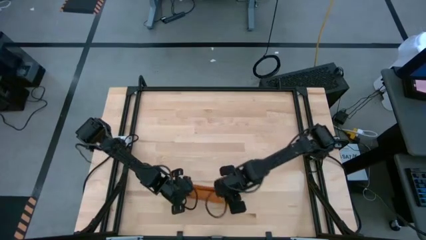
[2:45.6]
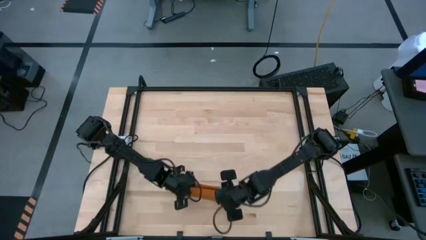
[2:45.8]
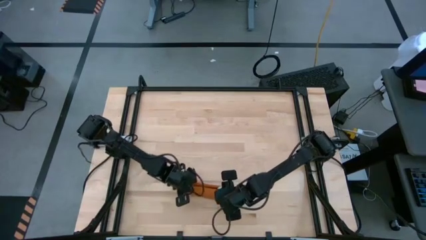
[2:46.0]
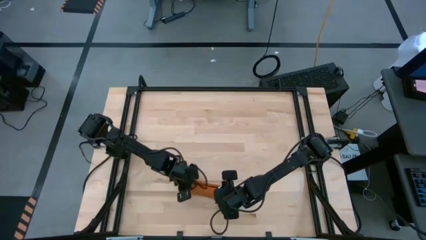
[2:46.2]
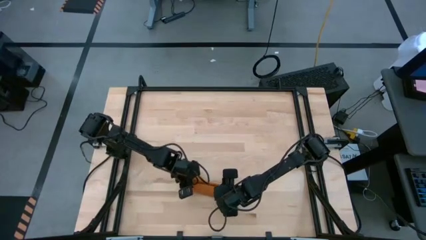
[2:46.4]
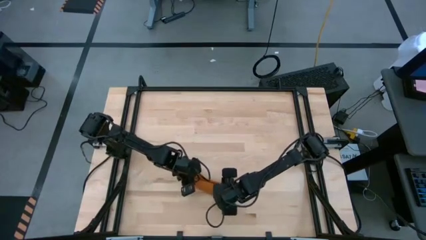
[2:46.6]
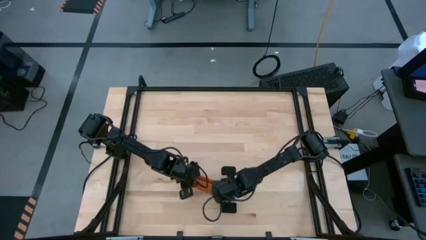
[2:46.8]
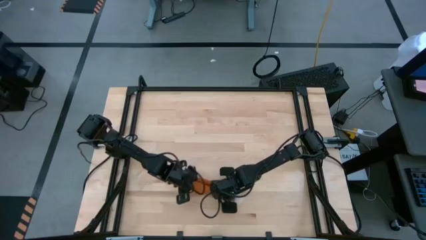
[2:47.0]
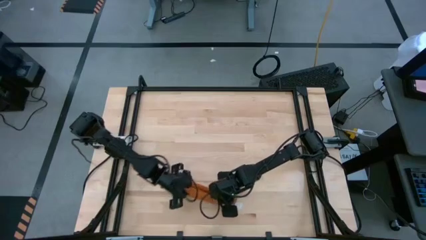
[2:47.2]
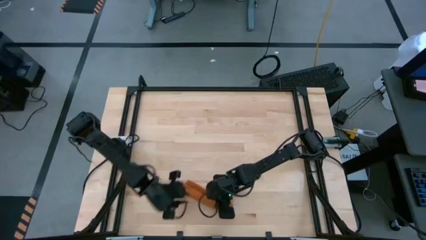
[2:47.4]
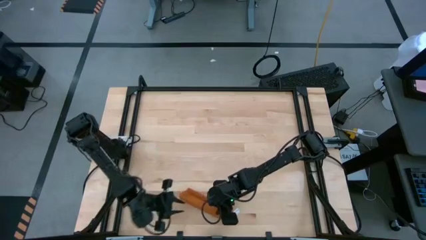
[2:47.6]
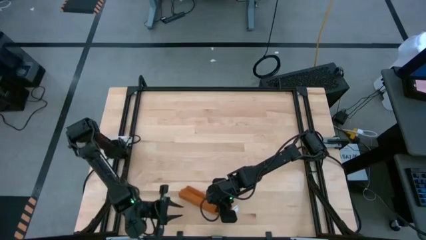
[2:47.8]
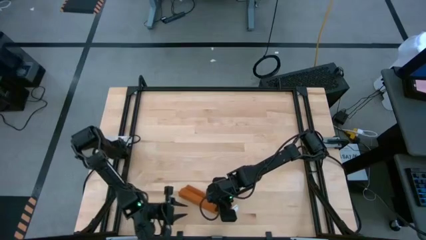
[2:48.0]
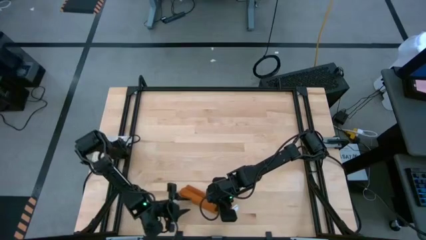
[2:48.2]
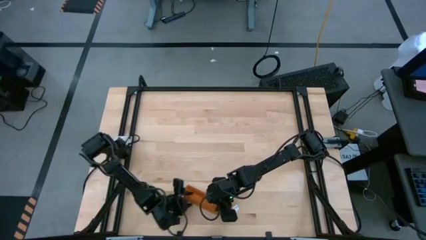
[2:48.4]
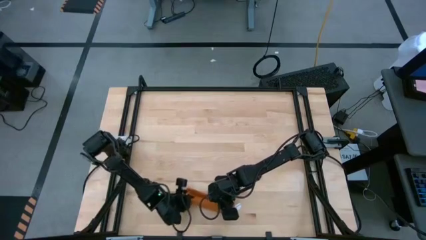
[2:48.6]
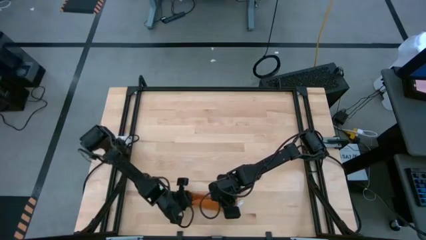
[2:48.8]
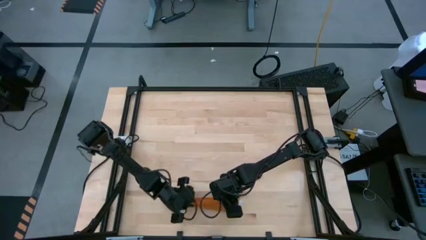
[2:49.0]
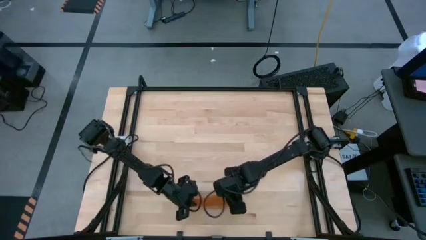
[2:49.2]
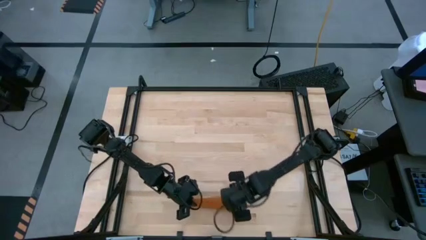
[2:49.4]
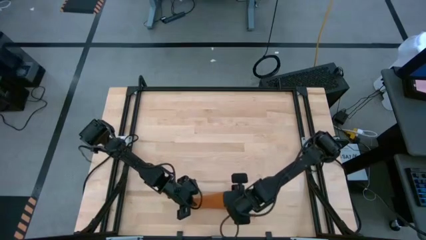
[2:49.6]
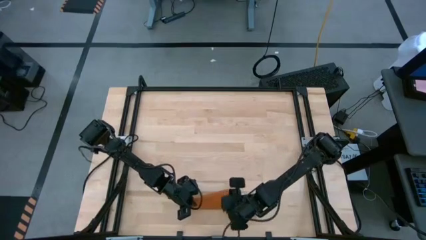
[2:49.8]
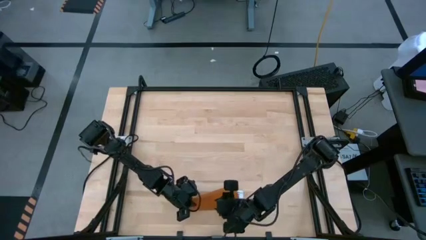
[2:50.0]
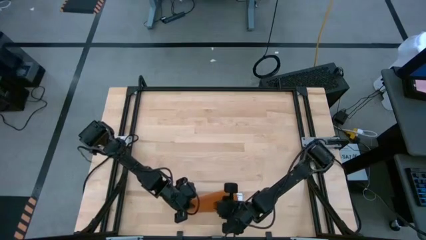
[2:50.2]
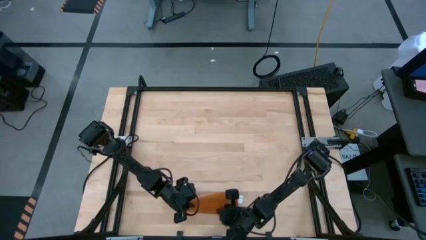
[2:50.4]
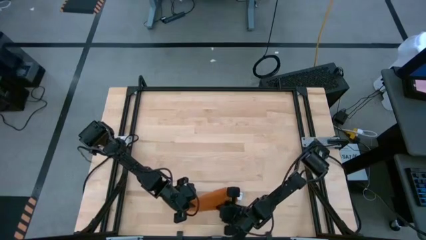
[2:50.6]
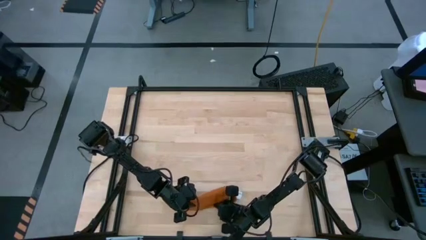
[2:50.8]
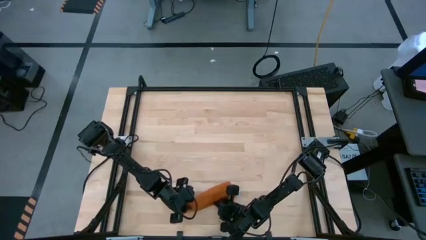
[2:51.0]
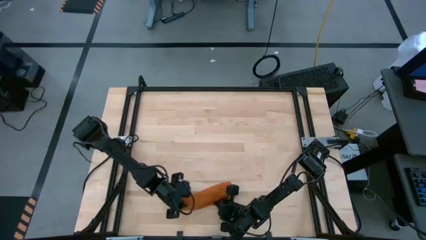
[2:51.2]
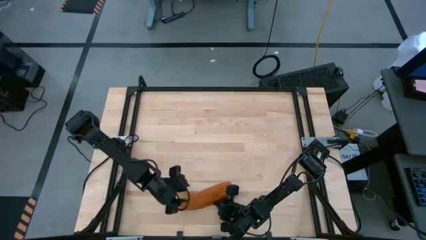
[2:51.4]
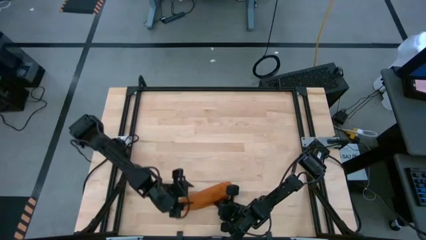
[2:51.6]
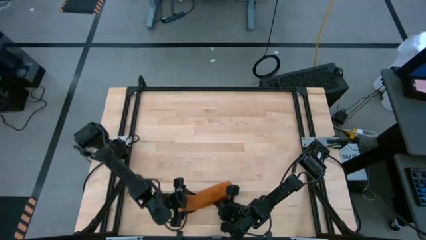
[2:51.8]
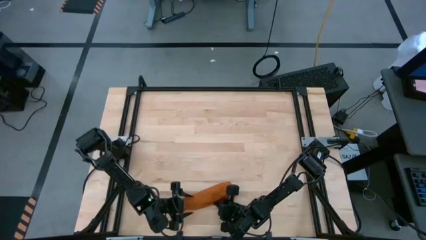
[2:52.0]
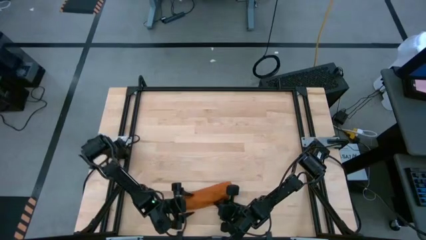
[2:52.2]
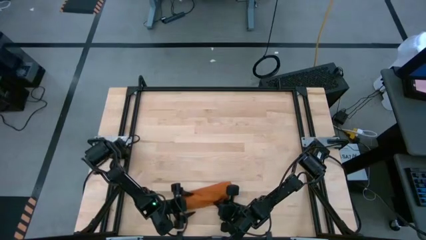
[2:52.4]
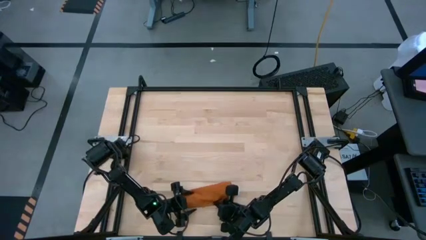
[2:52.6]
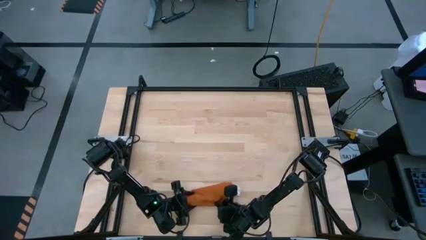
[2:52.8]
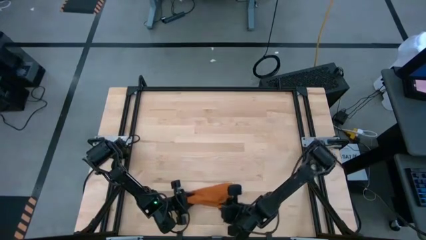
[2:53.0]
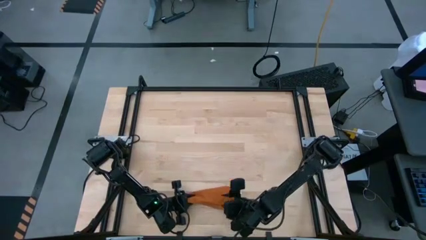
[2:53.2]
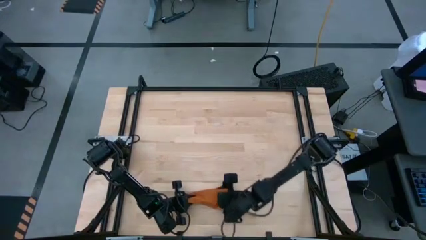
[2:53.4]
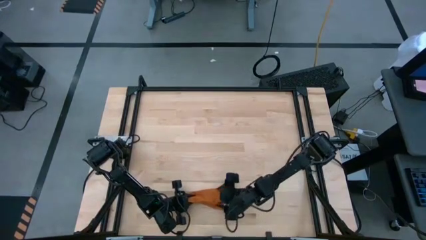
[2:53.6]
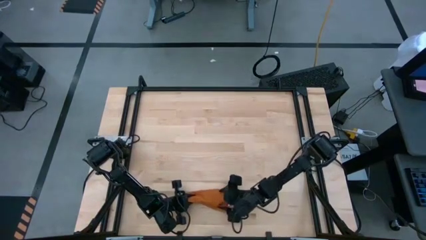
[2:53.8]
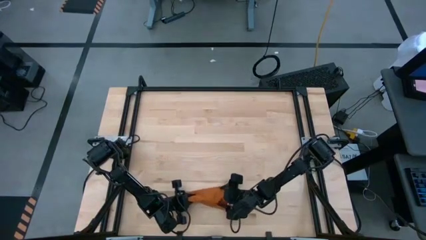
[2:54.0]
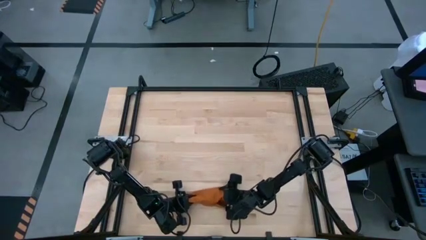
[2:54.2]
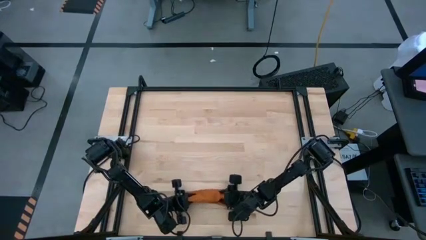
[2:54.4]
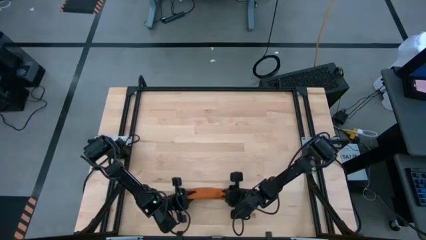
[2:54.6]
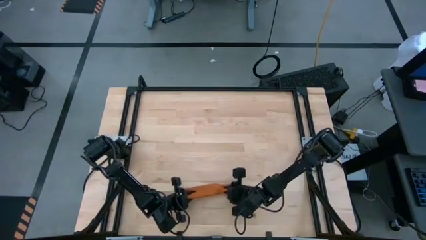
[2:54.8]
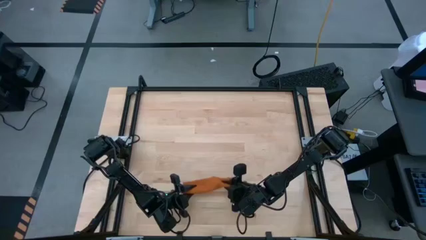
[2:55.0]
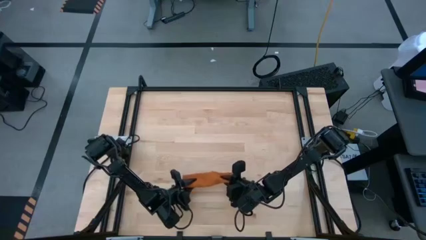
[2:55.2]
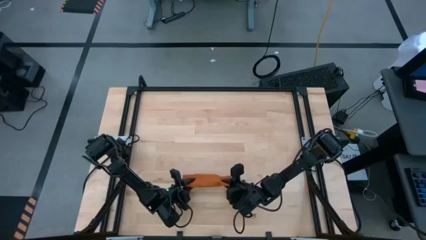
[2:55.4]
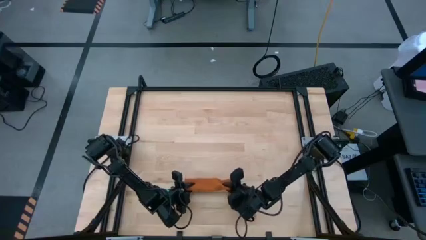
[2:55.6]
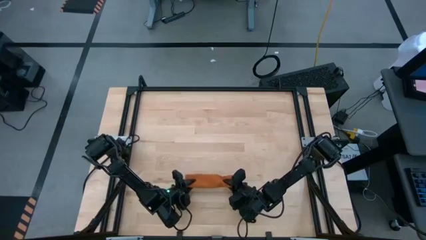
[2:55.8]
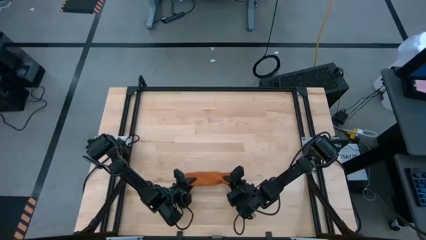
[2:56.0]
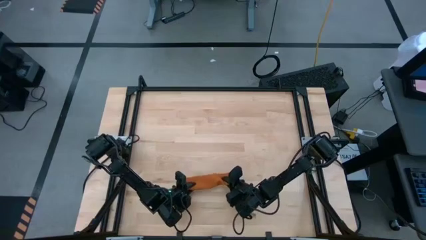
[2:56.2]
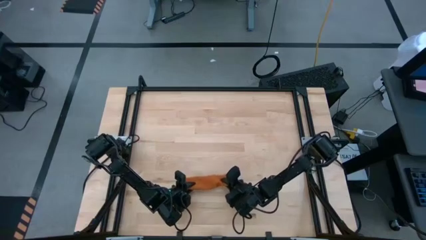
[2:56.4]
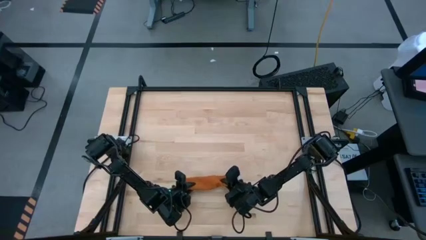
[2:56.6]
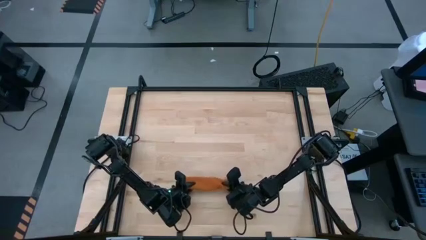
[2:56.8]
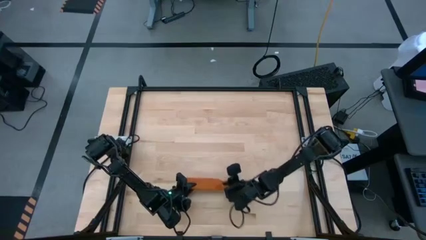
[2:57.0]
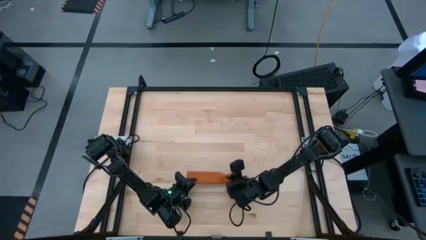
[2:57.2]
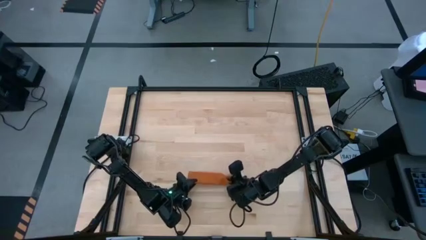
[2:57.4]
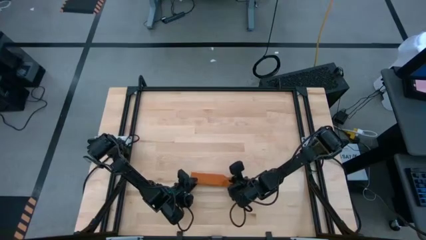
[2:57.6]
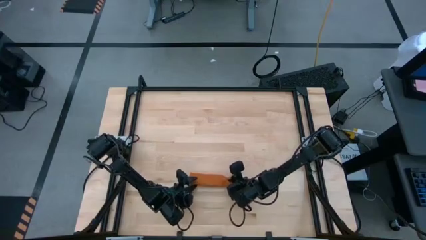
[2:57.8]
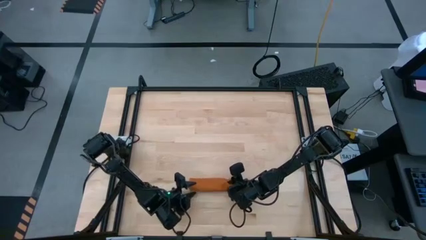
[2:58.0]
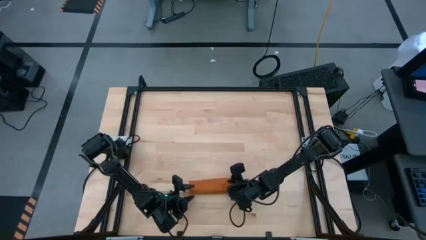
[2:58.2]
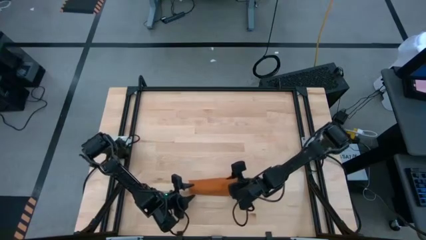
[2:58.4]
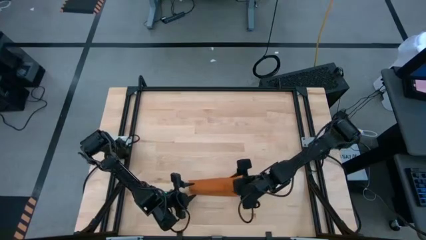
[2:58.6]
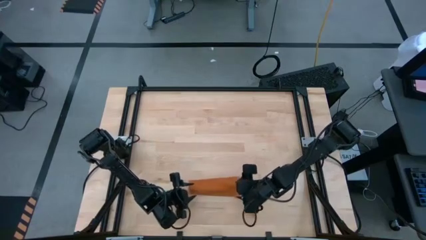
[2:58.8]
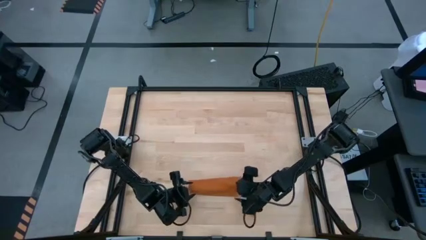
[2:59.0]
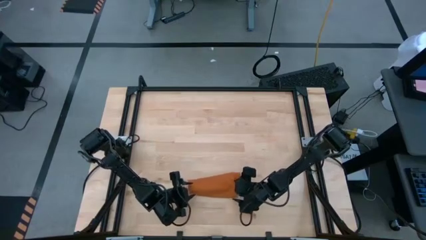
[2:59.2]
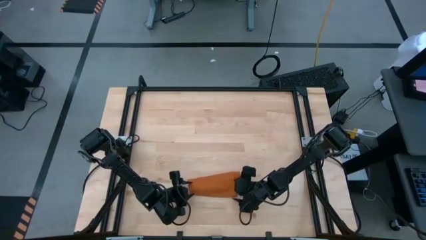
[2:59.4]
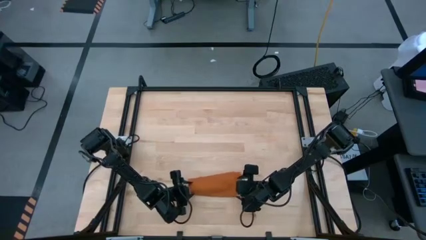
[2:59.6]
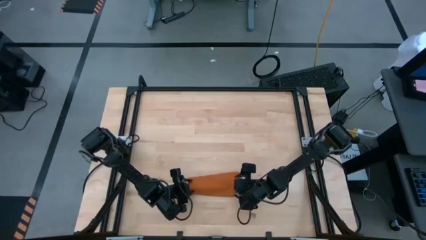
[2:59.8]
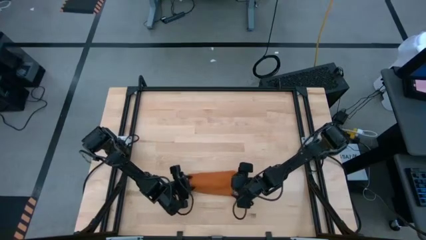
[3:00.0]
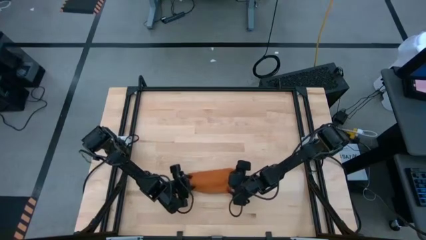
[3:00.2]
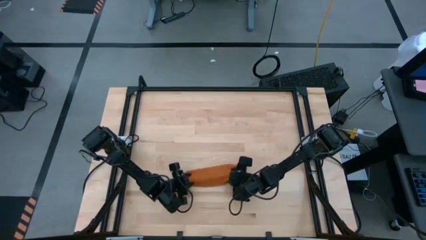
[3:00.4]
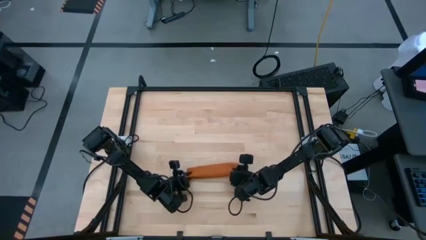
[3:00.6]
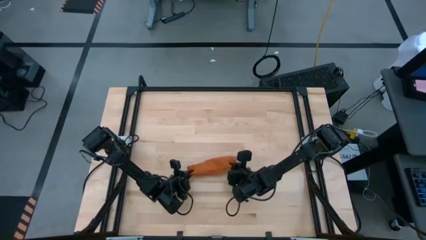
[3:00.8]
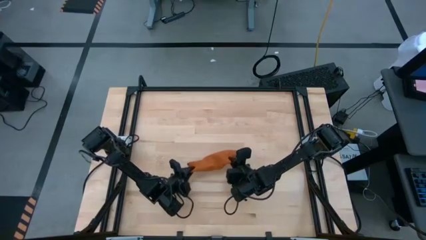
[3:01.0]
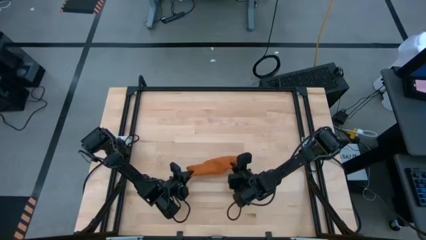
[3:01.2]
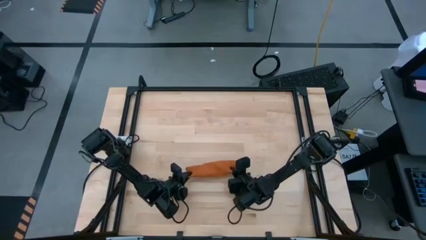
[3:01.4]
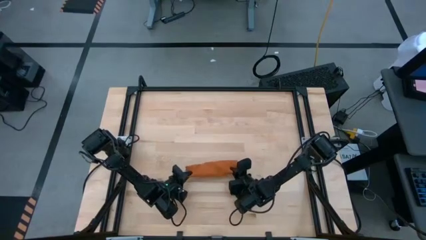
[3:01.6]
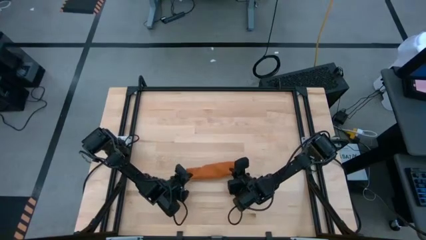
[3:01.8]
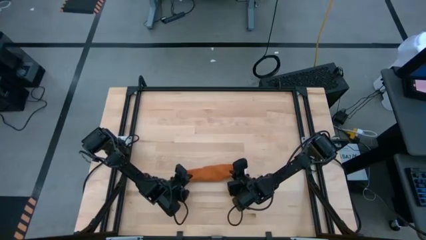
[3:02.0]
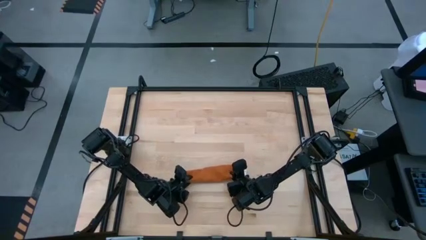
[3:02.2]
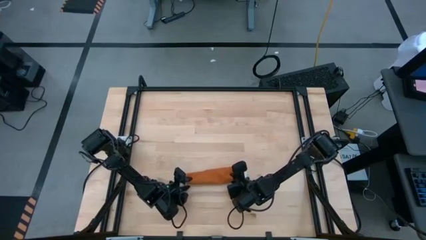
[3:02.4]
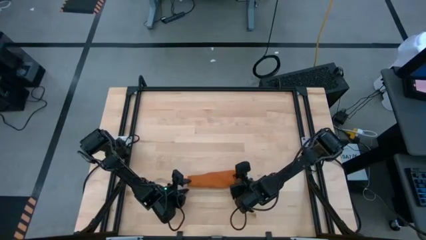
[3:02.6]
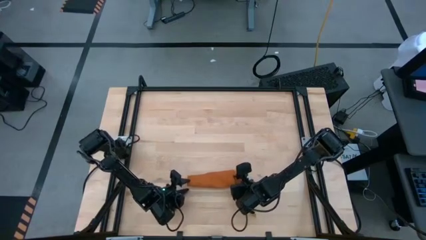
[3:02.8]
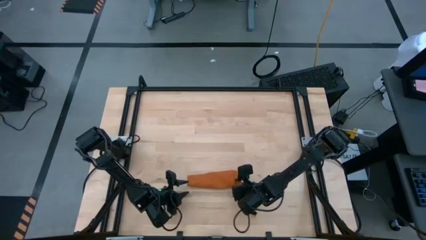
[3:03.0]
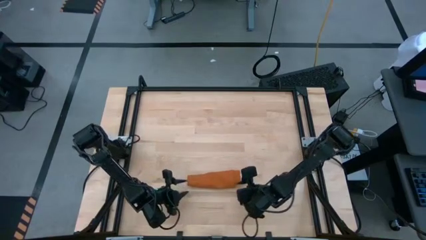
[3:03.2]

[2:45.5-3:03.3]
Task: Roll towel
Roll the brown towel
